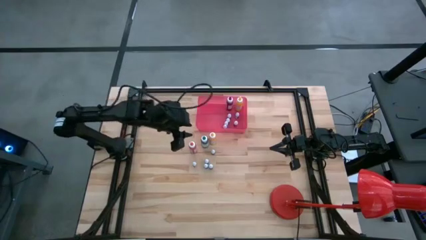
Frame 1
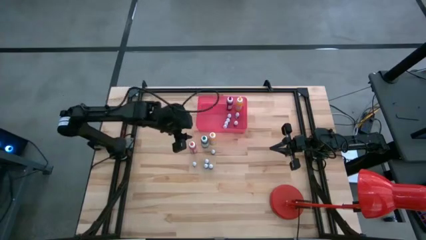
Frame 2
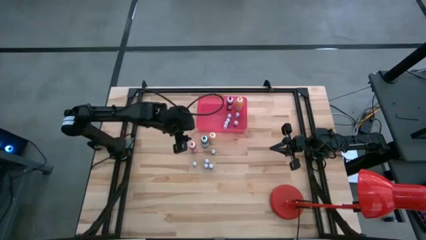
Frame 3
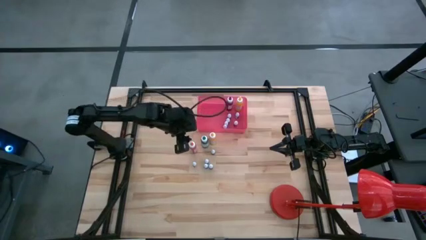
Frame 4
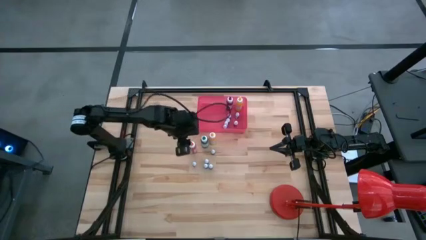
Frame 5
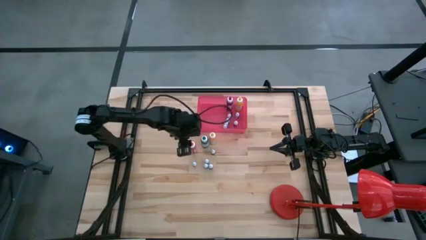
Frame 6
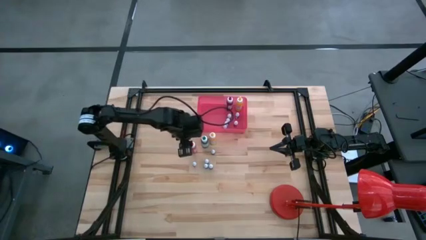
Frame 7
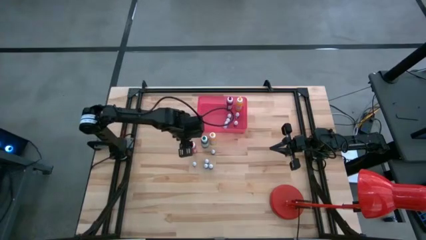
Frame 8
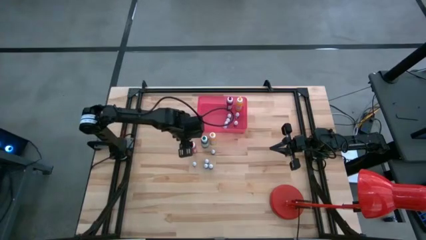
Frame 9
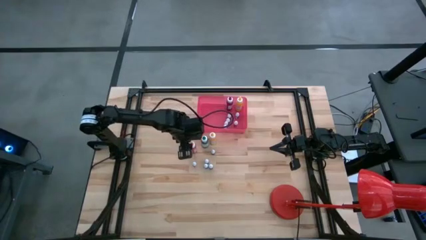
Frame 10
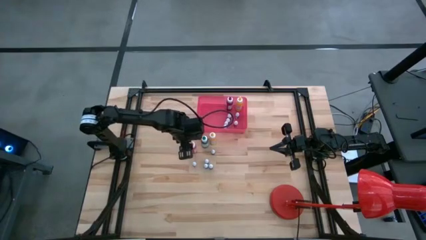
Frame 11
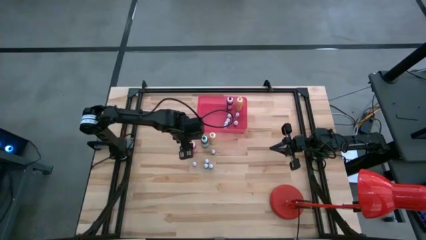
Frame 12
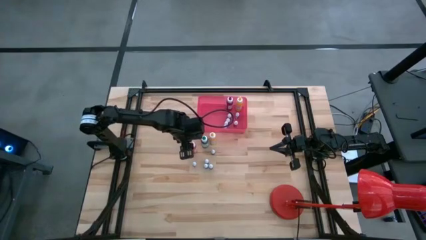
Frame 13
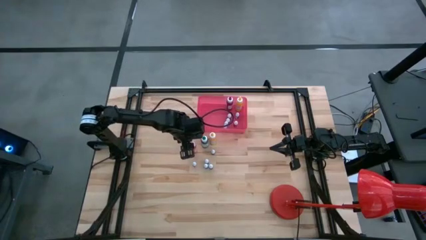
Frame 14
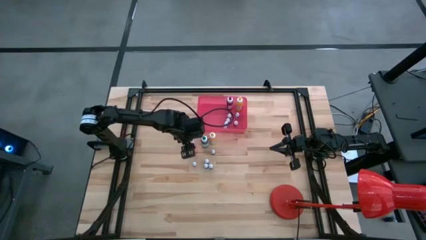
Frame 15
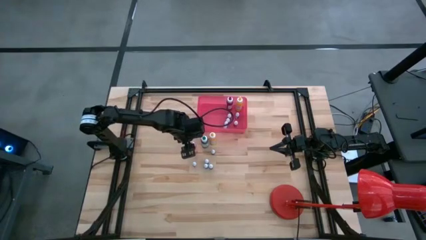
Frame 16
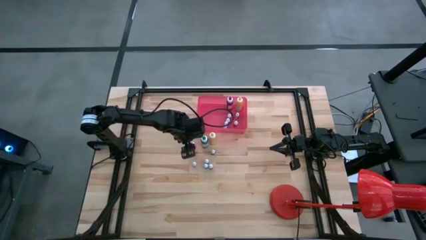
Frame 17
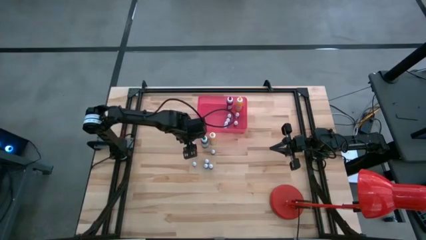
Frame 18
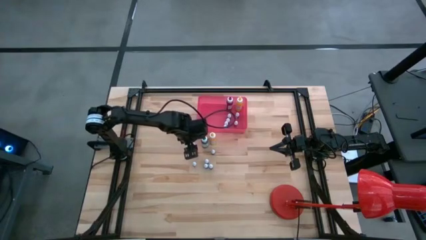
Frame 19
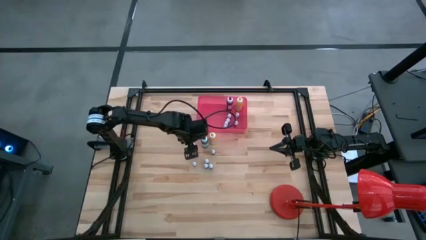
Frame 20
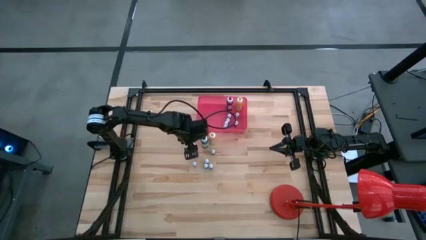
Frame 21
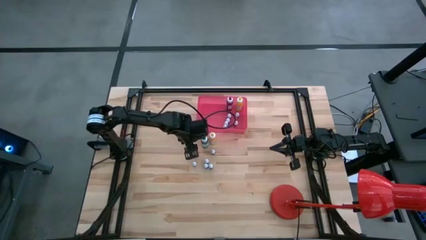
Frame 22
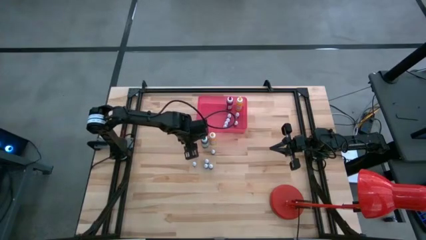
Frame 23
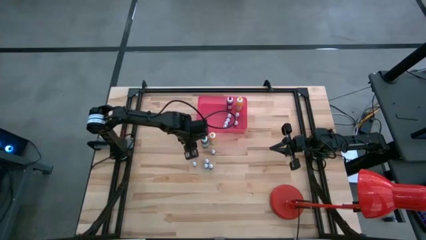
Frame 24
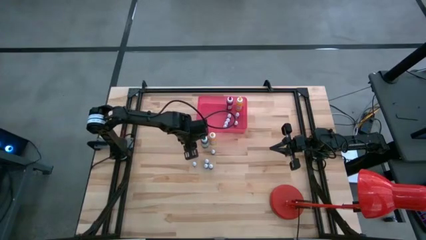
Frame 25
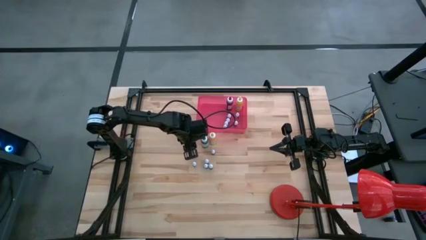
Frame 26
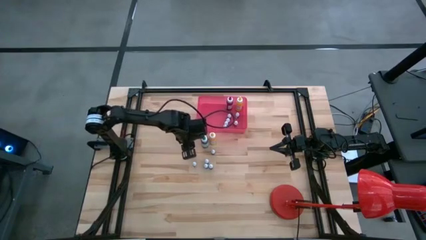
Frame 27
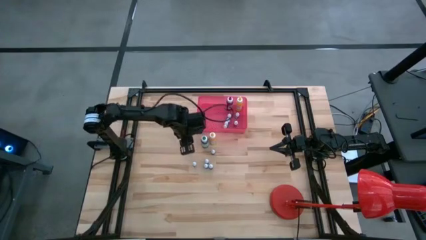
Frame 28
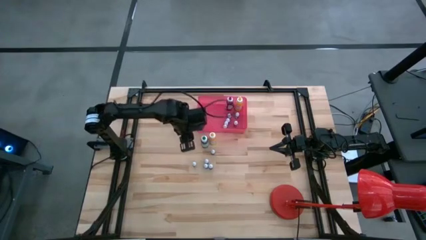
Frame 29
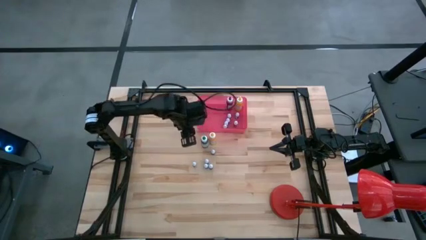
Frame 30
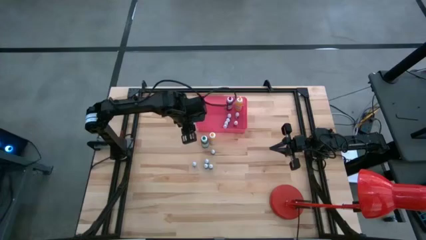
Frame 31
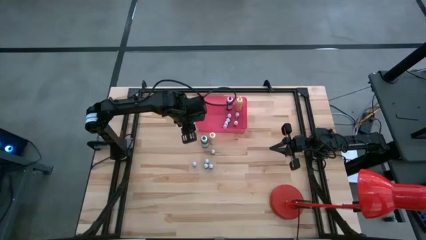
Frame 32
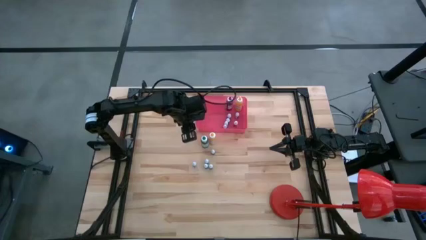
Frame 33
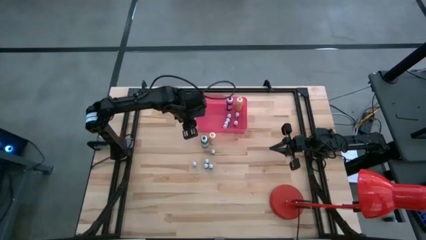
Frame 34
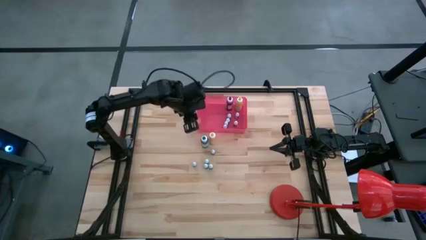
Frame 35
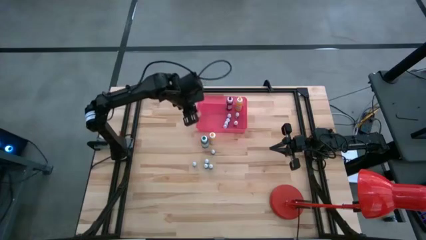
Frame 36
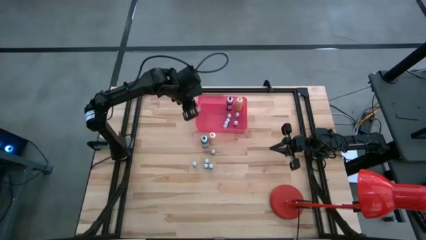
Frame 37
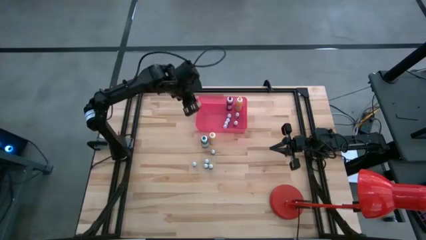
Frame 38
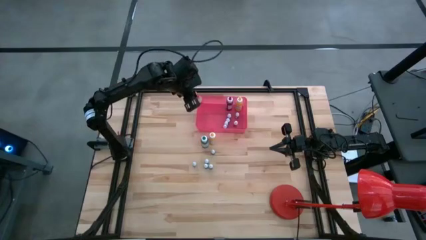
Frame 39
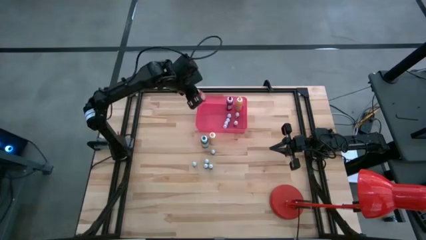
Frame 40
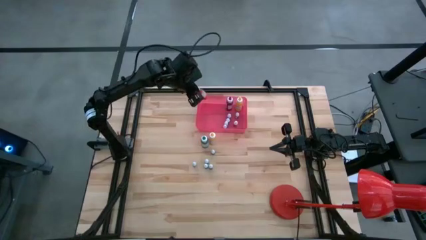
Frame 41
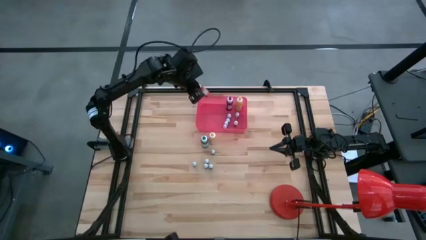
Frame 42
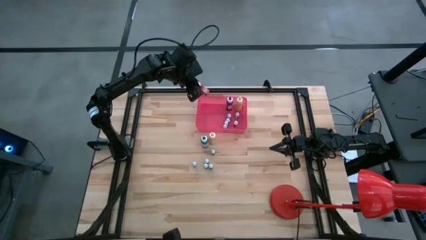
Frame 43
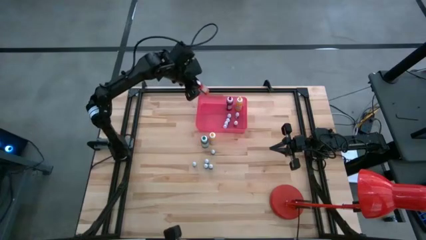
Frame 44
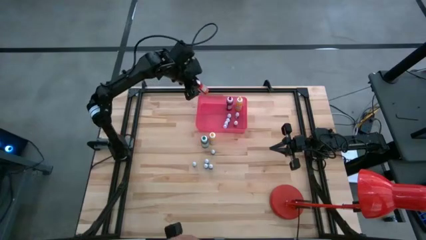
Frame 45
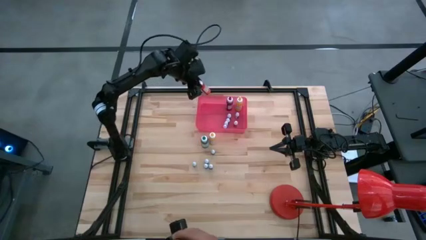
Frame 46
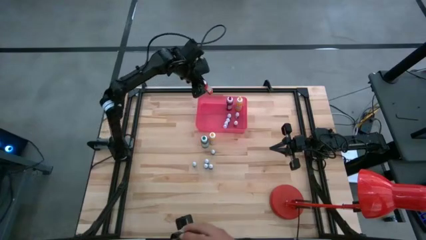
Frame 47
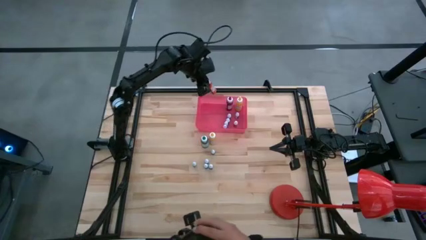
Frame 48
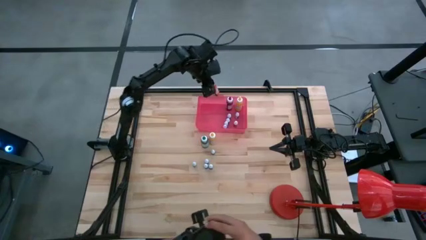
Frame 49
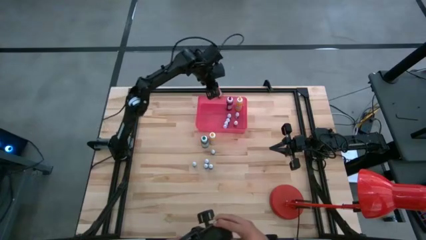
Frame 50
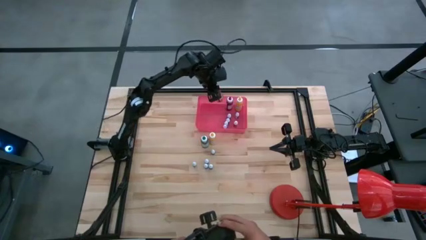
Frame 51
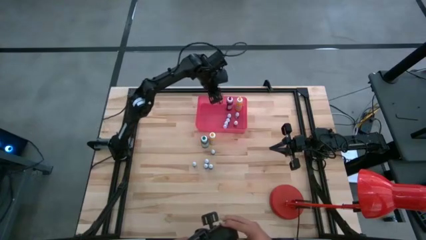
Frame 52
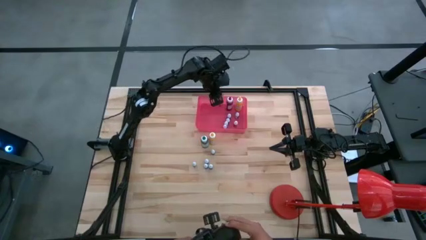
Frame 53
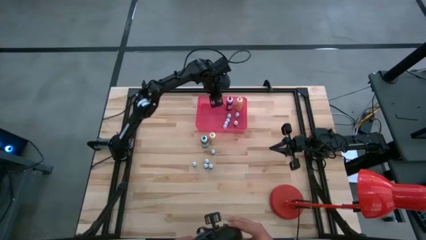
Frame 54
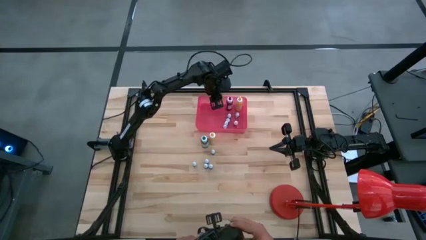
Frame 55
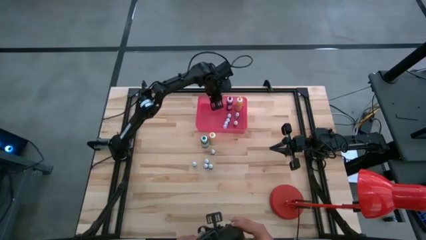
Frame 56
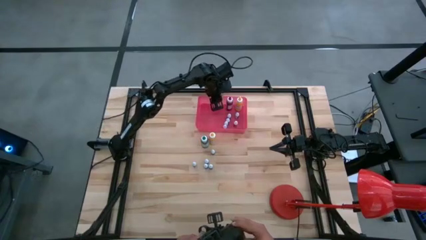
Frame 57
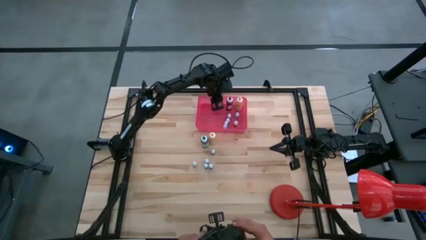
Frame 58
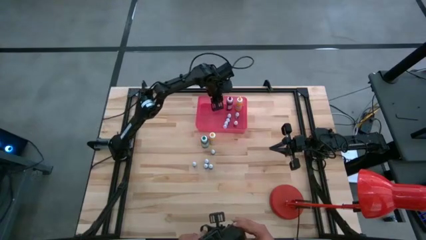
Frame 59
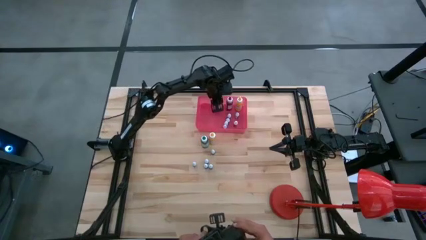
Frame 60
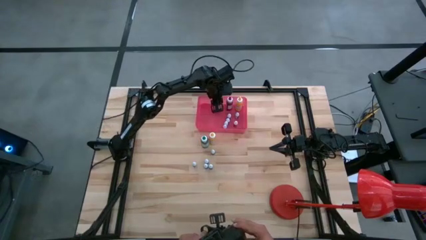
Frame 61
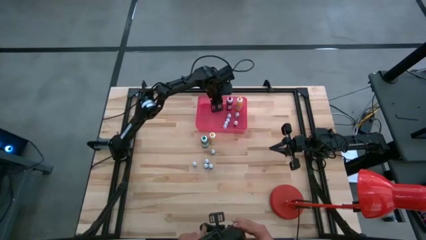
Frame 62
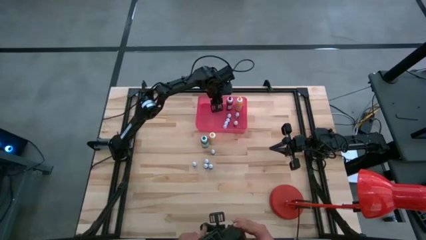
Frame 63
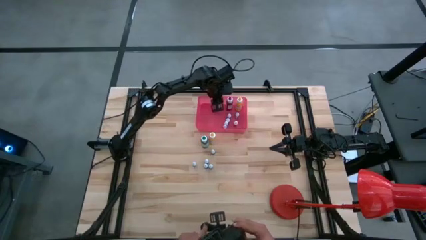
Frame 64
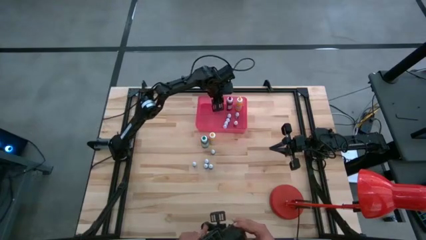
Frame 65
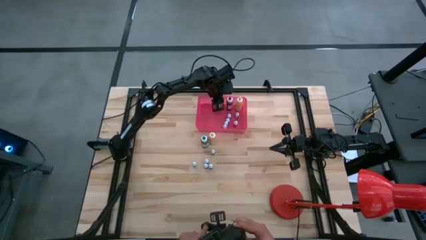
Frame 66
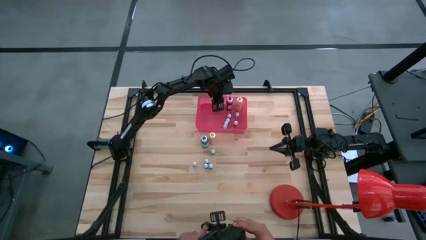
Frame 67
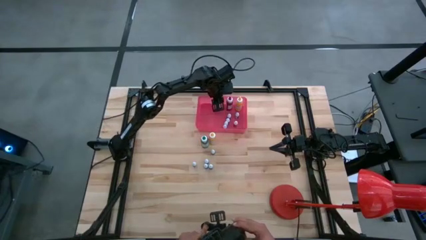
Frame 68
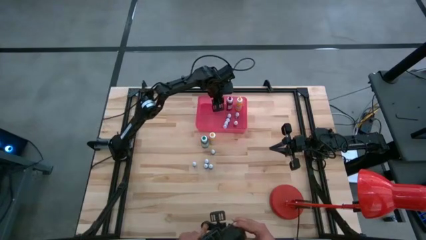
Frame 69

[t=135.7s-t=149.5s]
Task: Pick & Place food coloring
Put the large orange food coloring bottle into the pink bin

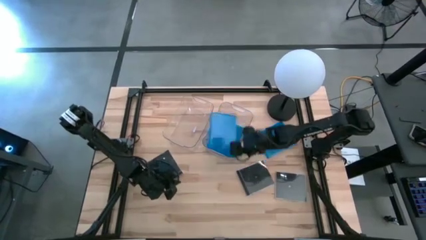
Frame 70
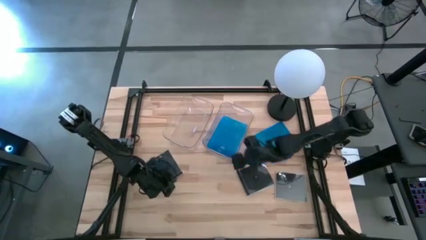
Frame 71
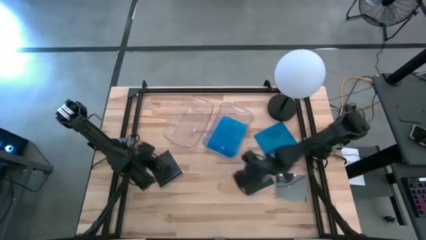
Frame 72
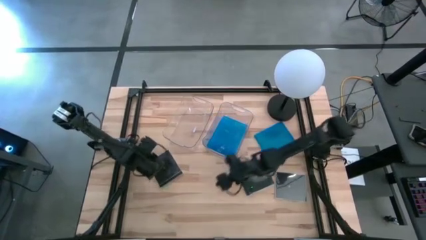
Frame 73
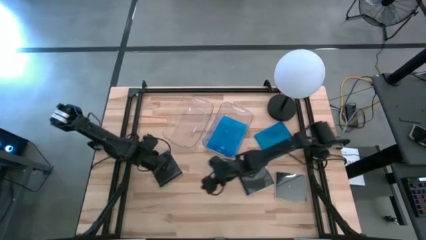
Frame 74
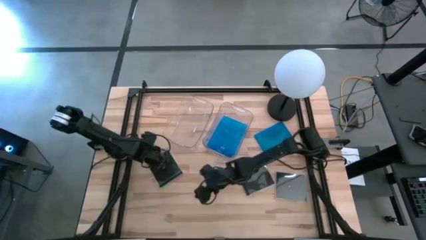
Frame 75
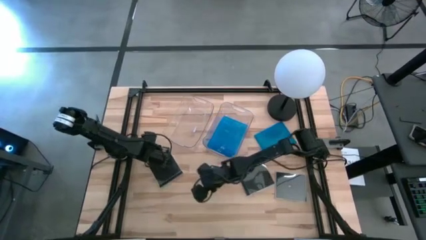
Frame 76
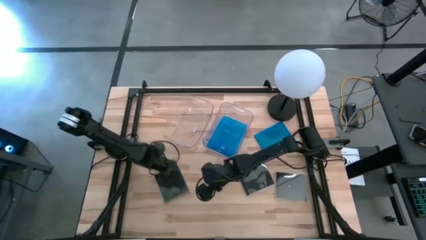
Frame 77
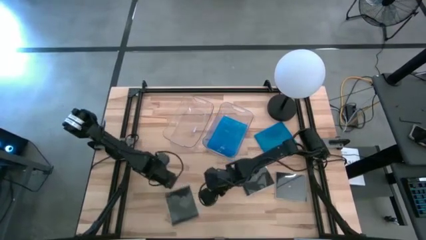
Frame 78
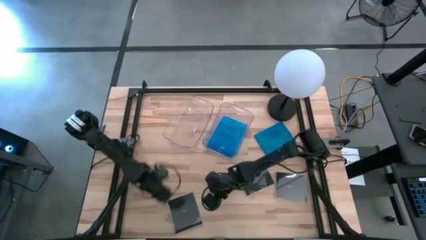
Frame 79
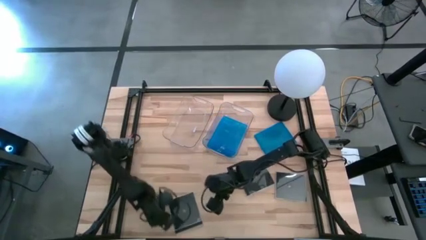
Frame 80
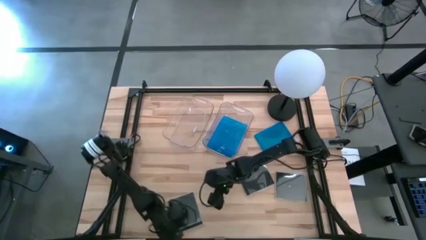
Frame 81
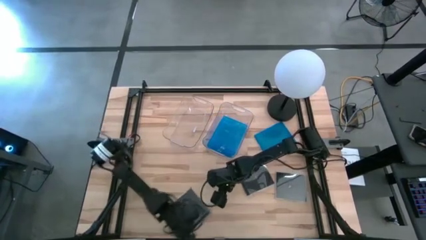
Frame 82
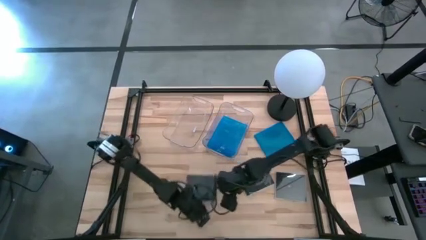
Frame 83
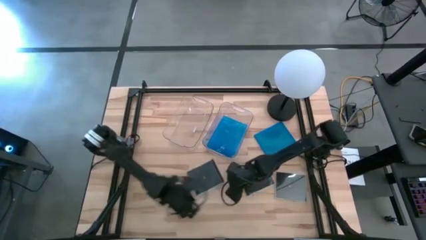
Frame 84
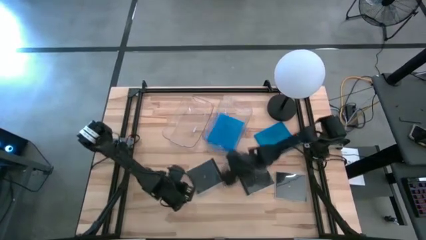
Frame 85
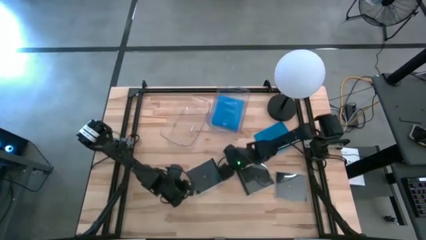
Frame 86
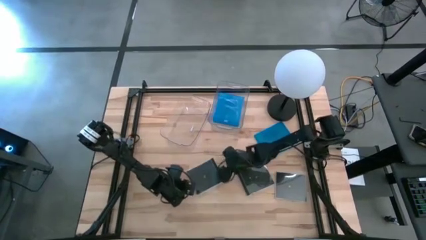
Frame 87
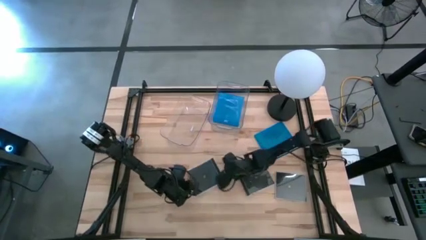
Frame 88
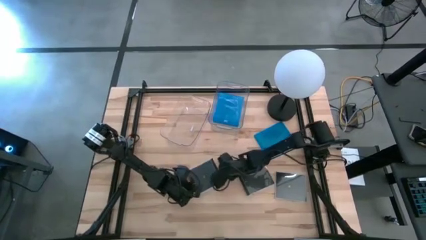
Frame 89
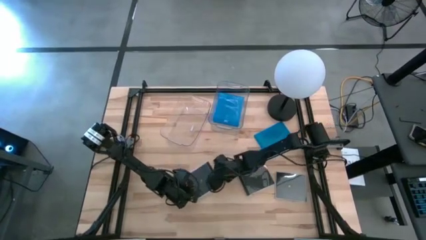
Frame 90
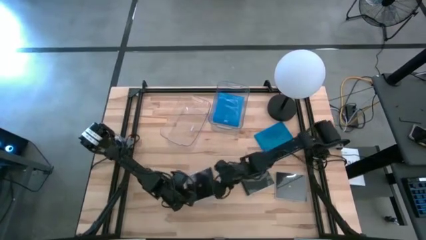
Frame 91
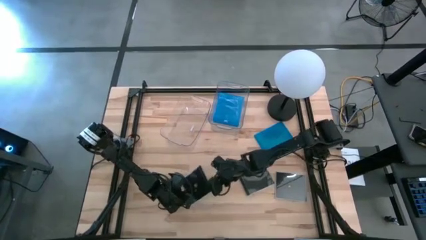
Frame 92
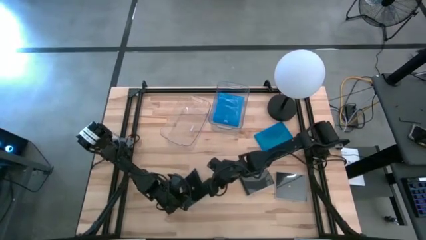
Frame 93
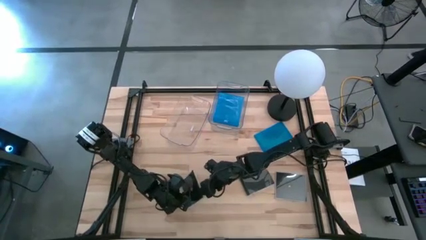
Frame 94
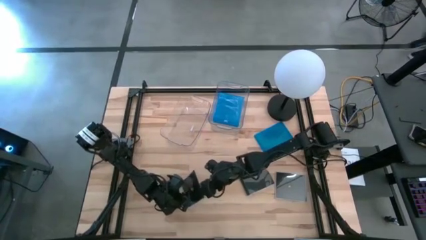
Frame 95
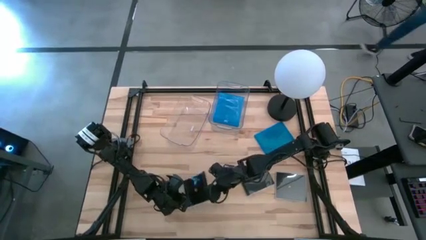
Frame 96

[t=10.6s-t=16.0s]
Task: Pick & place jewel cases by type
Put the left black cd case into the left transparent bin
